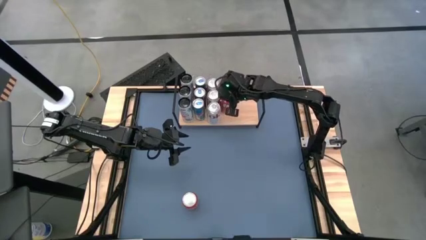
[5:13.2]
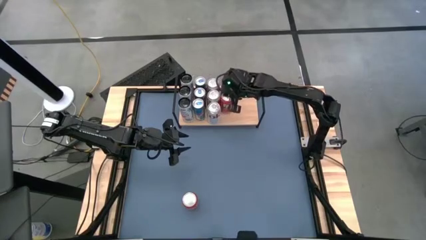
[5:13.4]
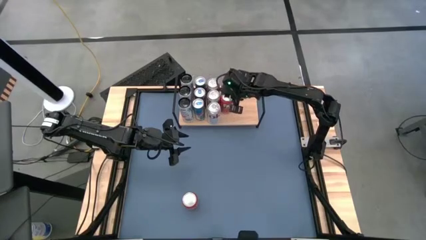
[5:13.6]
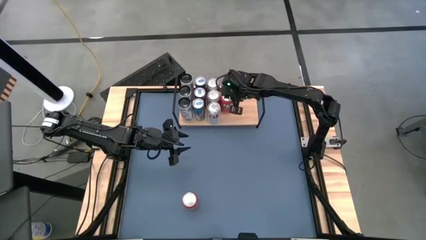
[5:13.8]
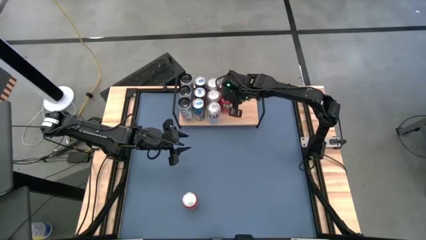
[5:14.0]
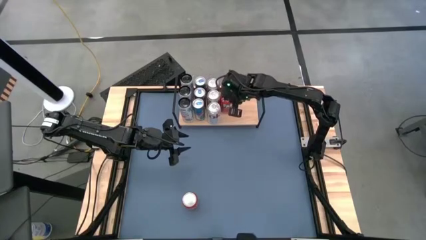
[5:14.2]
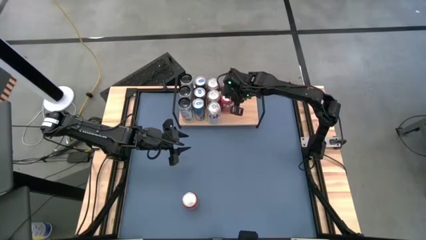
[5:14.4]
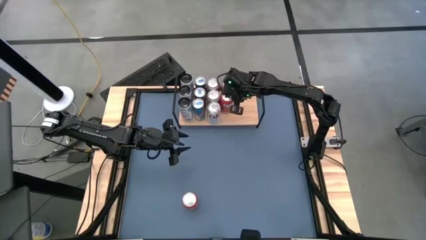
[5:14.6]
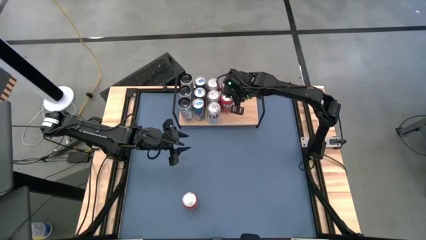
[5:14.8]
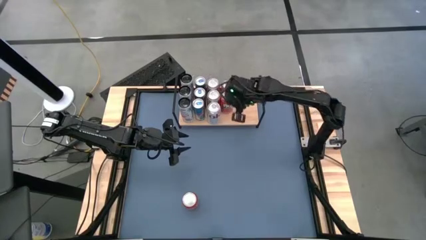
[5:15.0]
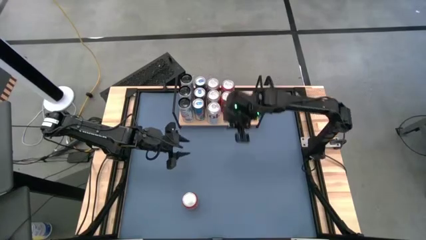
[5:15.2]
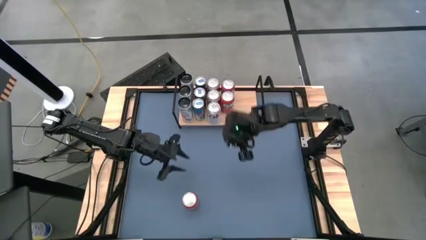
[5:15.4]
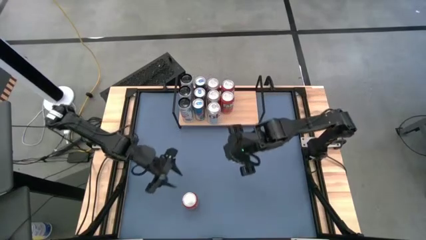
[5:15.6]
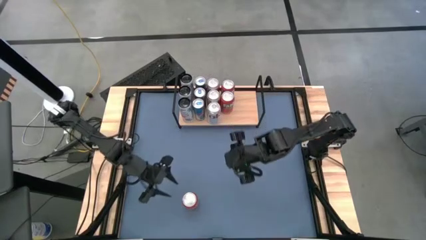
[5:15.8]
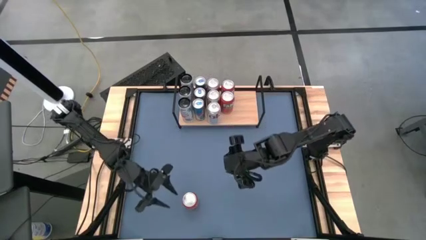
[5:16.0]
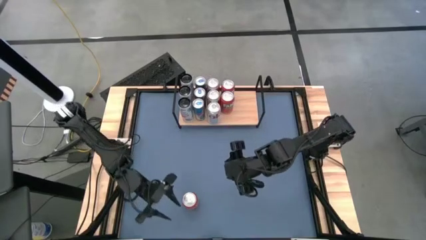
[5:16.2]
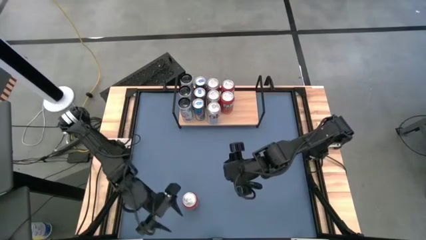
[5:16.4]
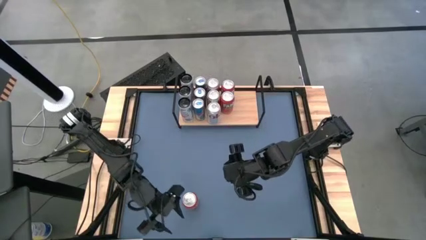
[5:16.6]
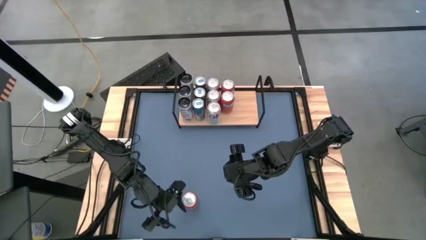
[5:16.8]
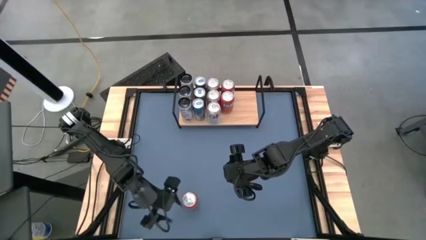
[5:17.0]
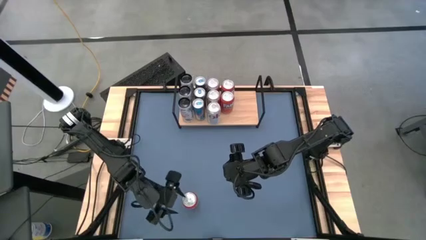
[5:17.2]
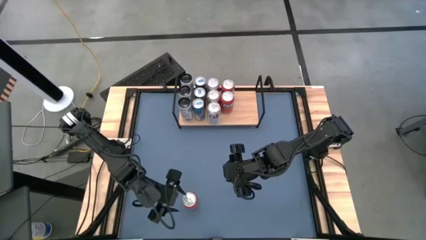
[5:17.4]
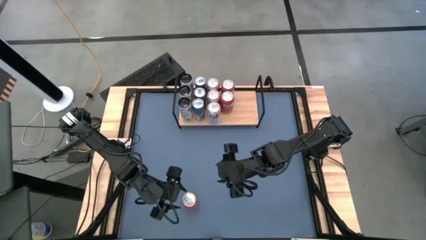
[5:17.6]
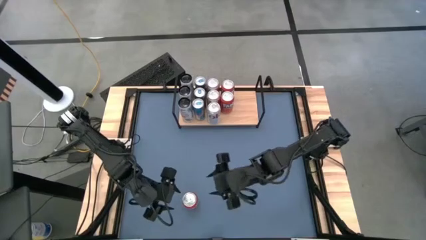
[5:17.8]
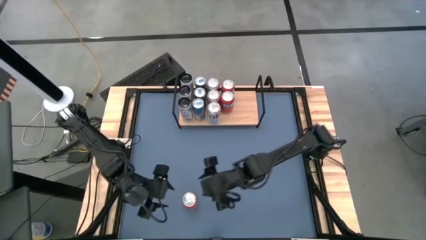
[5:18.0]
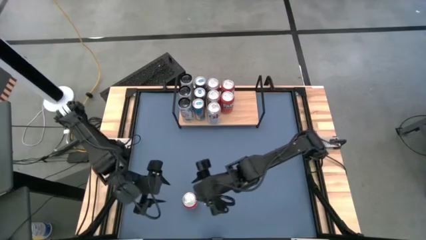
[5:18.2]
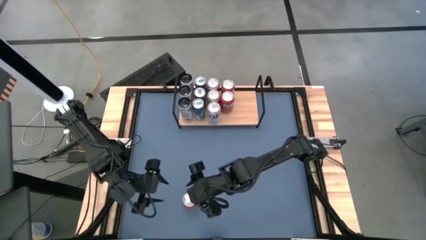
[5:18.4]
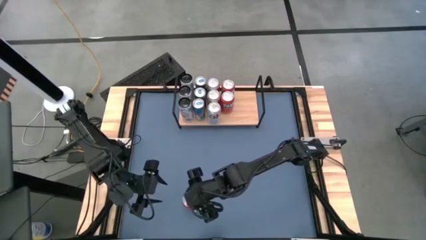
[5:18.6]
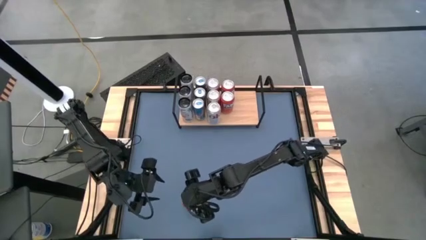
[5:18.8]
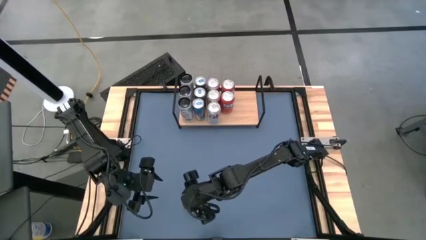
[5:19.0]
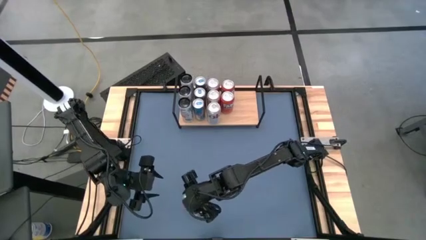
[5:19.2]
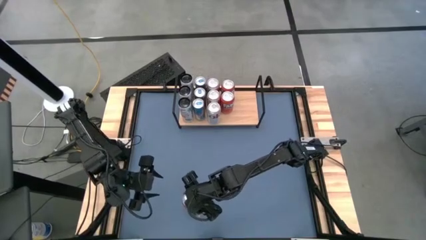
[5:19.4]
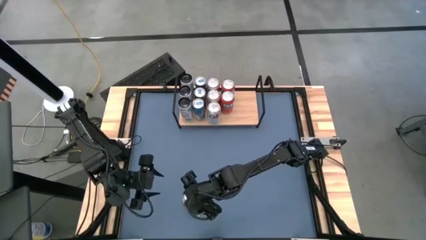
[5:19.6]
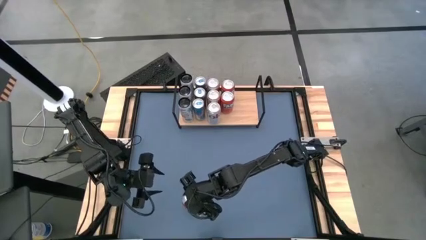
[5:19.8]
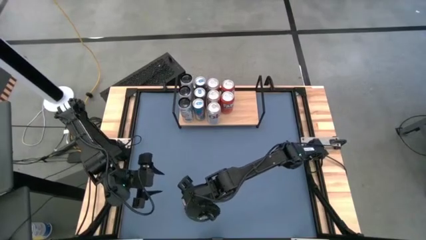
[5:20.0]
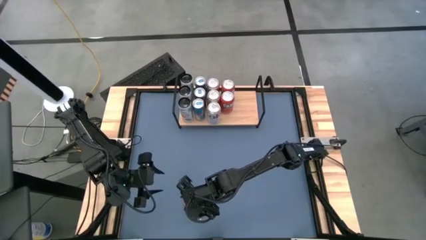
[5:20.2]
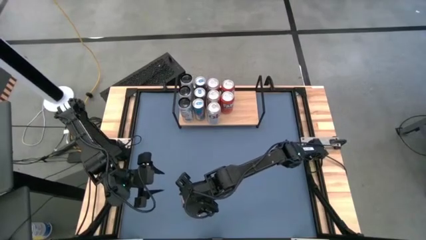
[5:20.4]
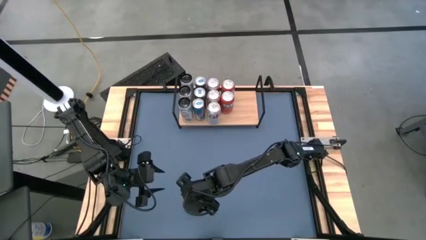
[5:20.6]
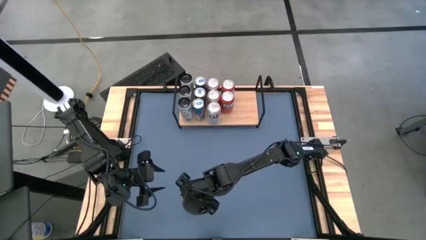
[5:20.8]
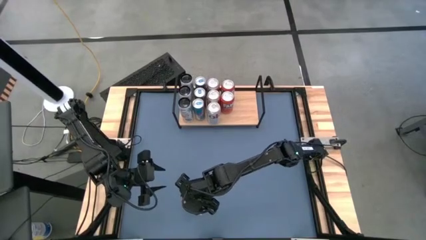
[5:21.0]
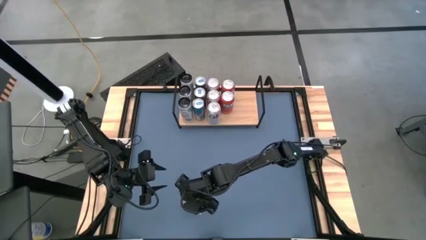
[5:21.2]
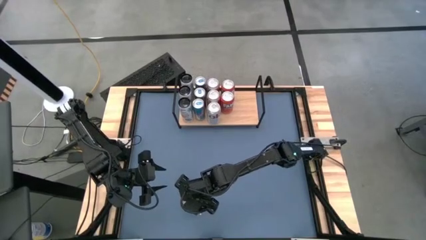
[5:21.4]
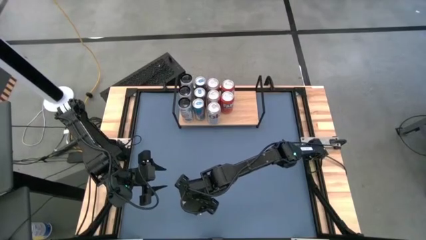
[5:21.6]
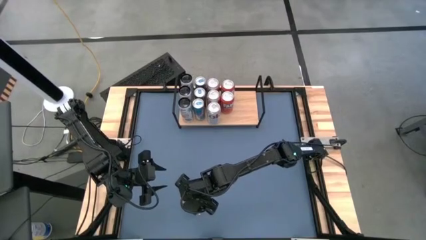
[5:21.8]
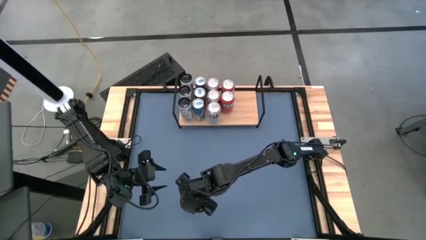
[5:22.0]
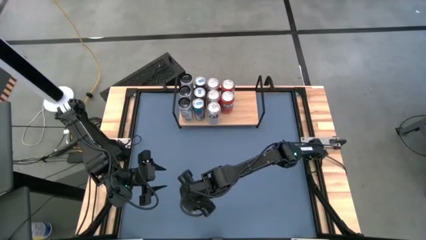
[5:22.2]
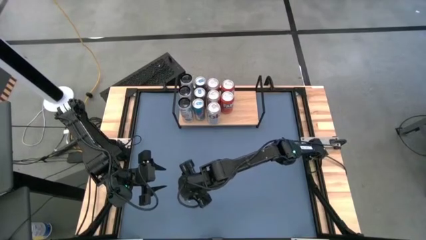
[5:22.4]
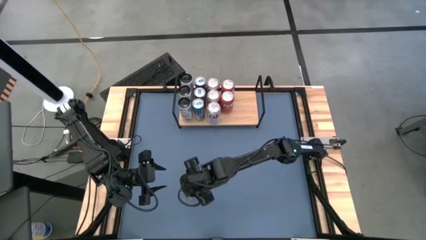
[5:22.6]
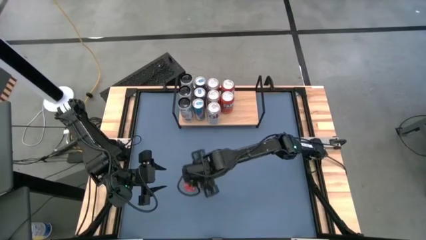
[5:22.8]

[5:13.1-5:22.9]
Task: Place canned beverage on shelf
Put the red soda can aligned with the other red soda cans on the shelf

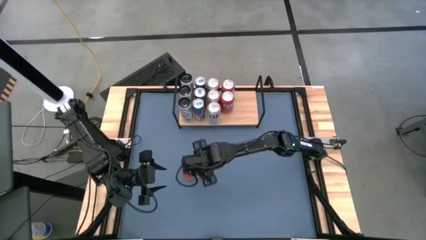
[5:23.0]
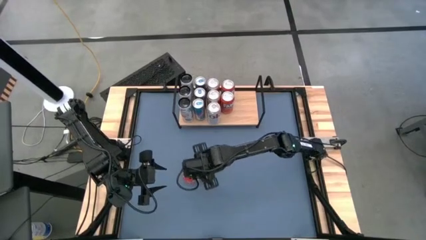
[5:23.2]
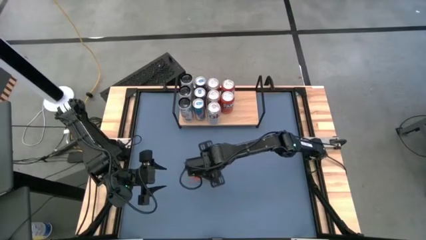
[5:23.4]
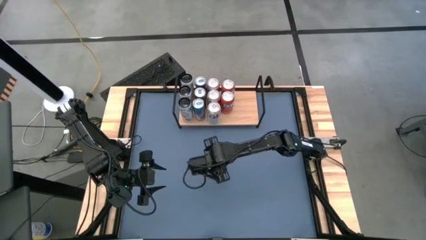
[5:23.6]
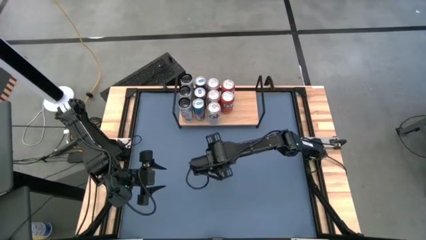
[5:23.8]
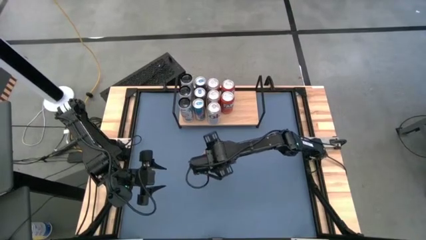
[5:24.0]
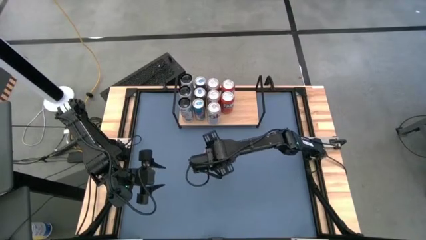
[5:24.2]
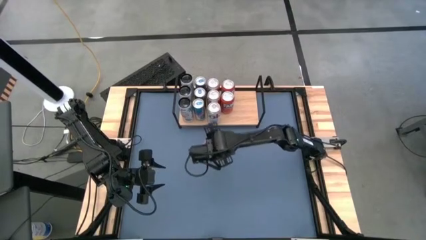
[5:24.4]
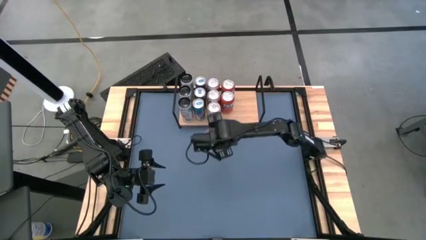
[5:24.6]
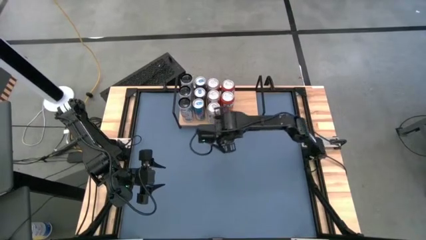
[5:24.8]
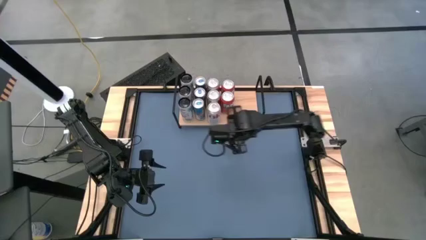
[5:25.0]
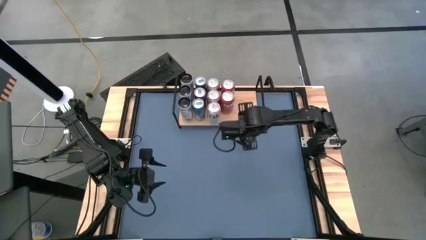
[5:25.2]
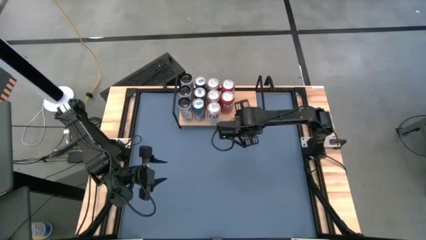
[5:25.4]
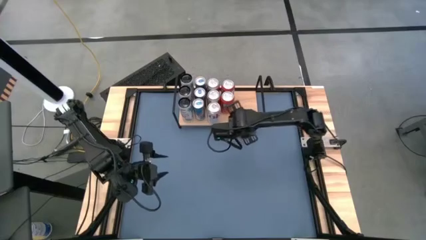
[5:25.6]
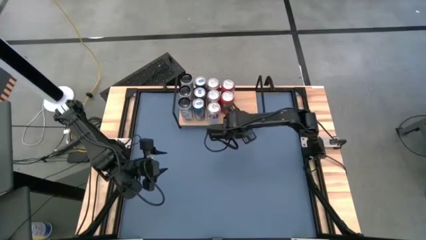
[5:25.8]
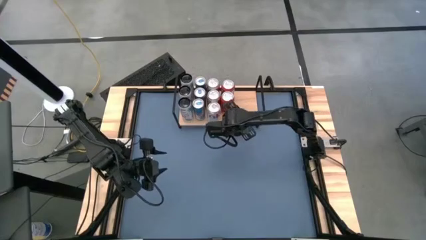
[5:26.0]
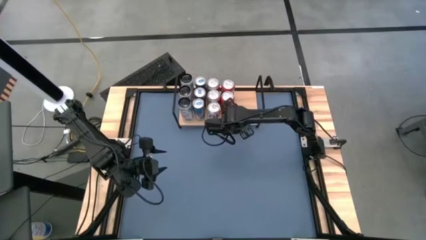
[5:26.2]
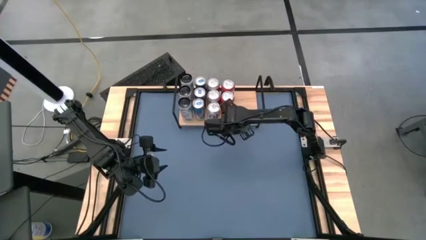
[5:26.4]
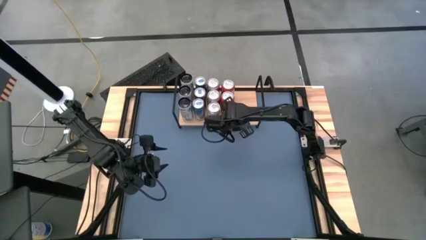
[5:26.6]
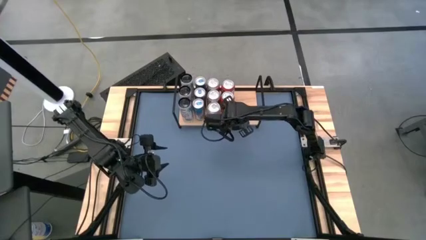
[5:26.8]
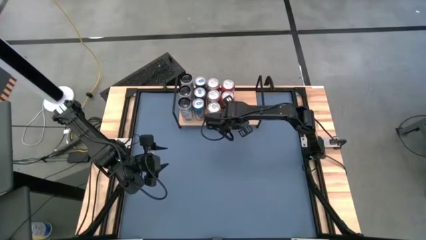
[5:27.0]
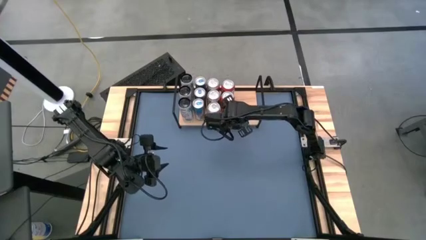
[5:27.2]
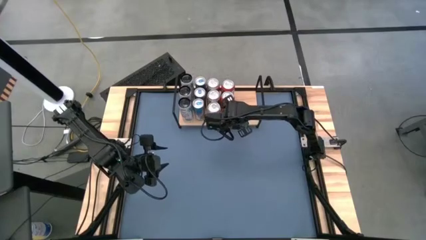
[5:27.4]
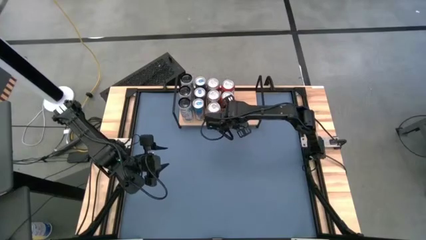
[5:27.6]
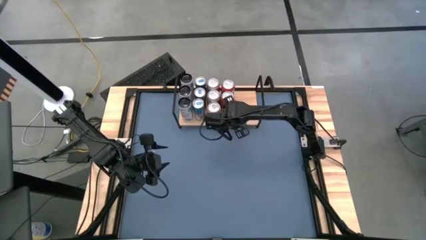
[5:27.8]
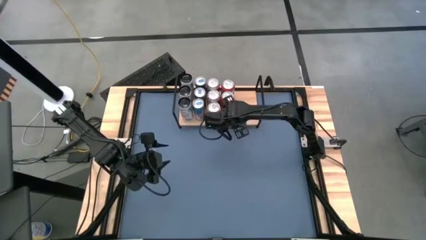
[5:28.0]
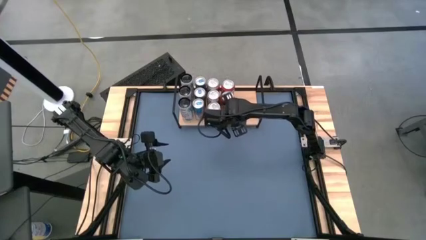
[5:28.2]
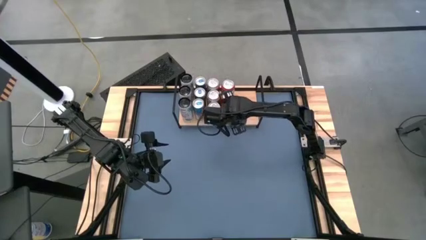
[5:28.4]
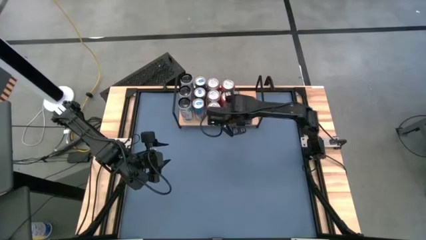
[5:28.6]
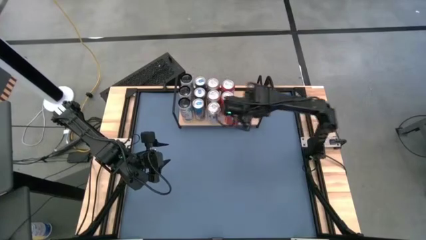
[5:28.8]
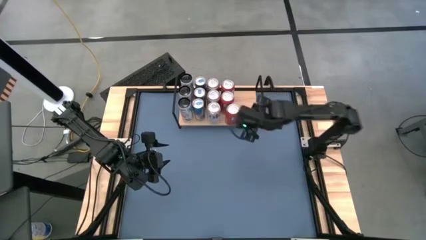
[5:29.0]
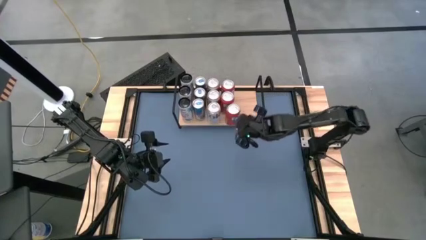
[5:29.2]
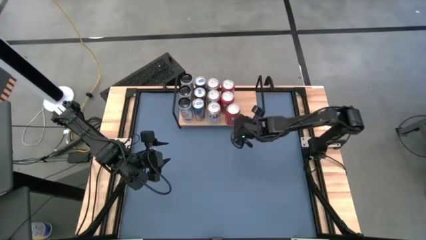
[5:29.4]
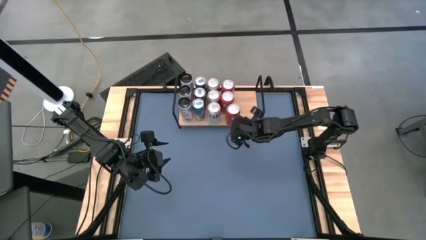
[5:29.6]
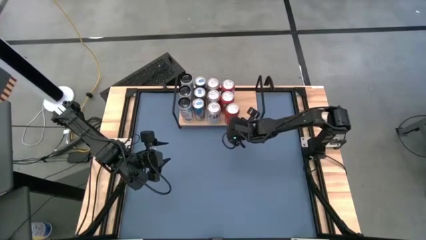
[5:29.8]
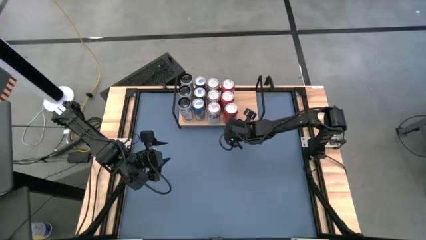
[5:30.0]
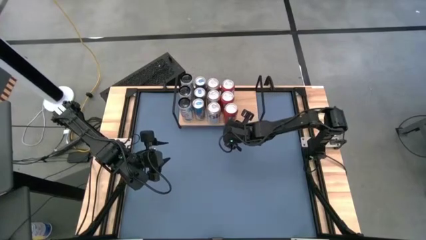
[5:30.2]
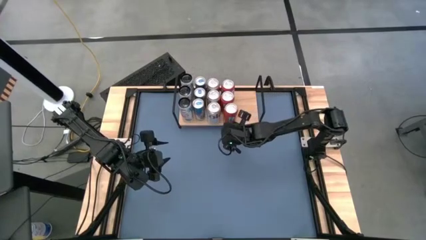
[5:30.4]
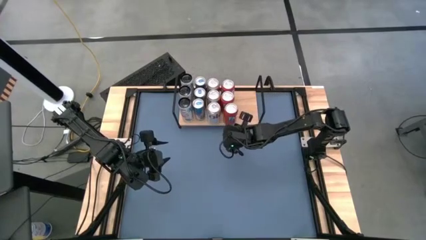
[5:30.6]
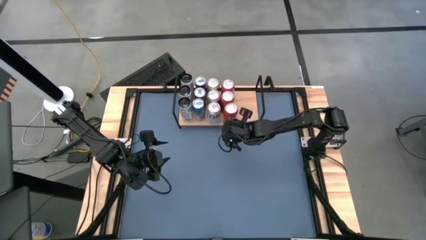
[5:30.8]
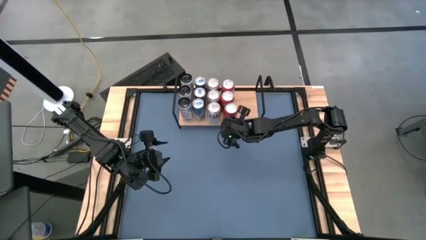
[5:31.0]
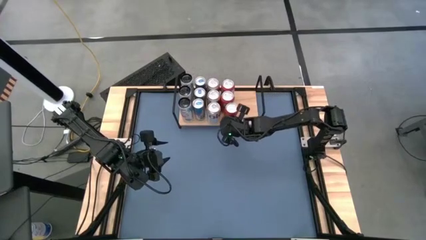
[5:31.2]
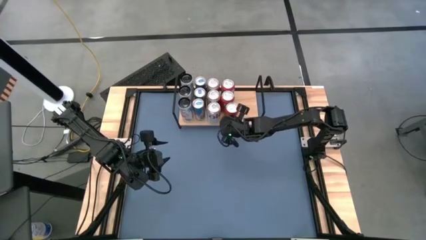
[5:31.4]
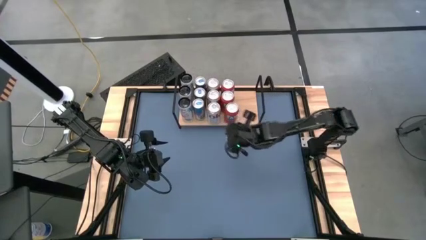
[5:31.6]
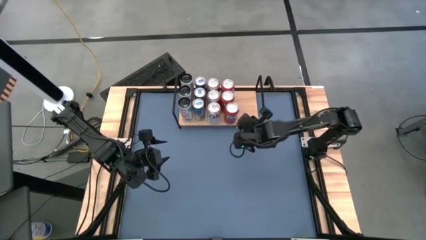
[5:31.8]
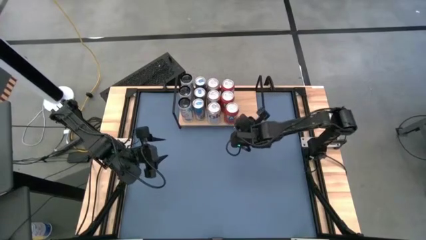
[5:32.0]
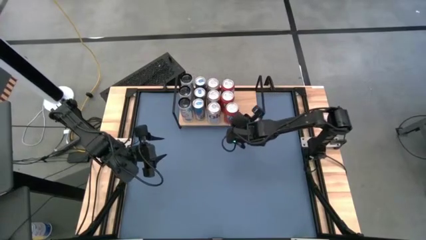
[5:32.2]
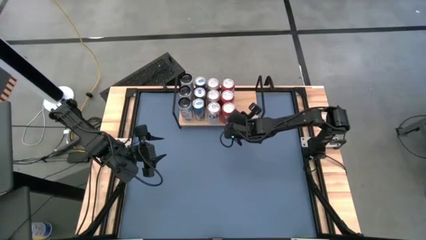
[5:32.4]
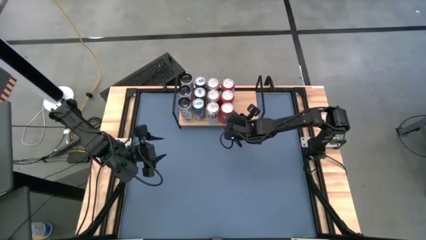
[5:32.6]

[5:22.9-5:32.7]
Put the red soda can aligned with the other red soda cans on the shelf
